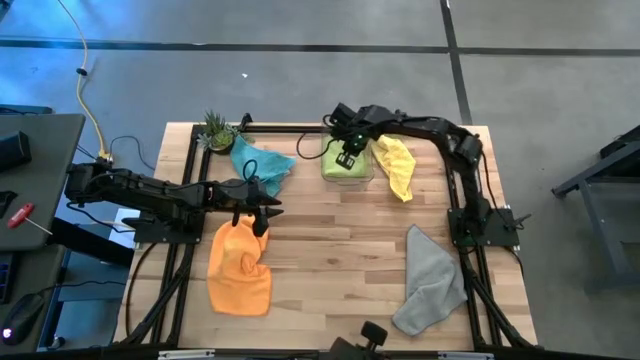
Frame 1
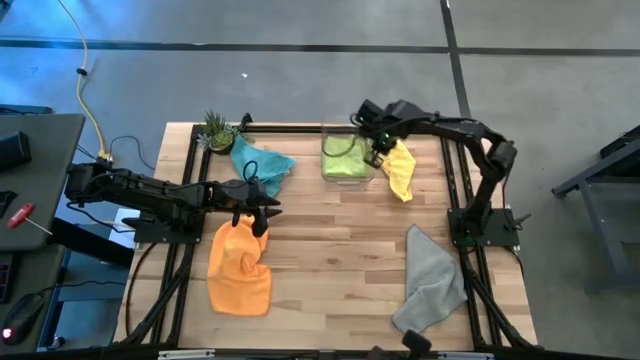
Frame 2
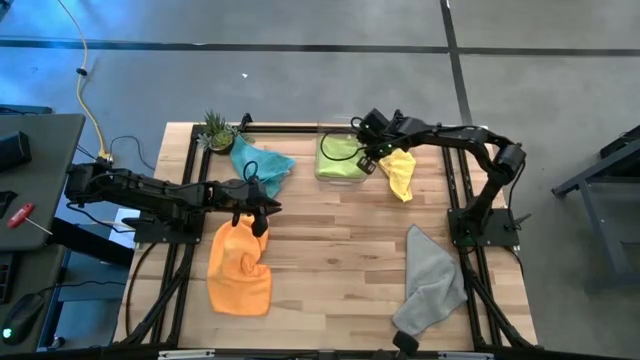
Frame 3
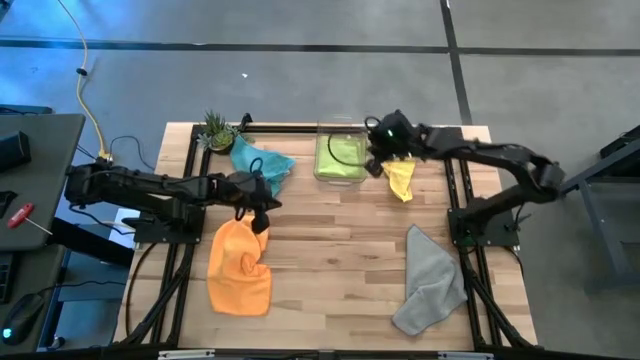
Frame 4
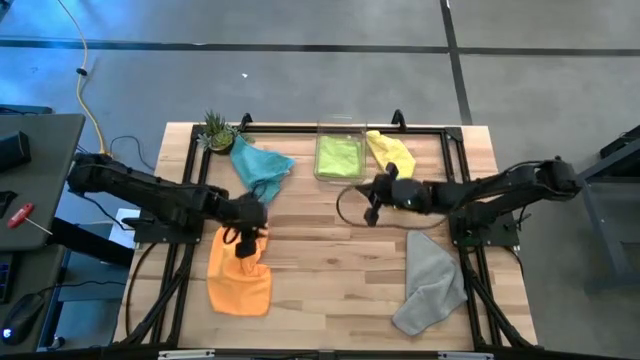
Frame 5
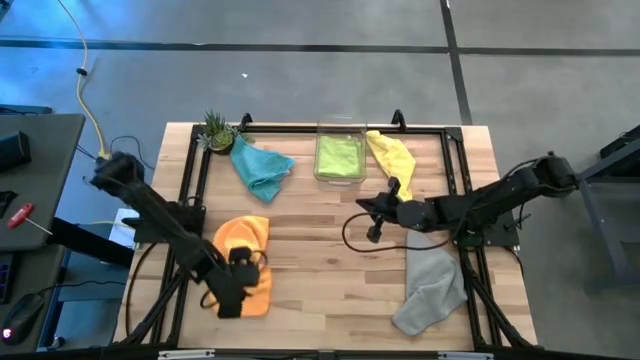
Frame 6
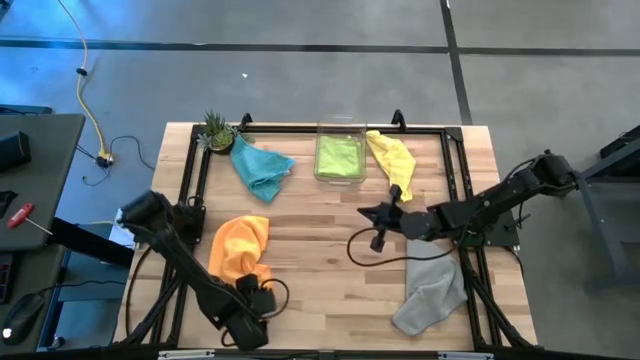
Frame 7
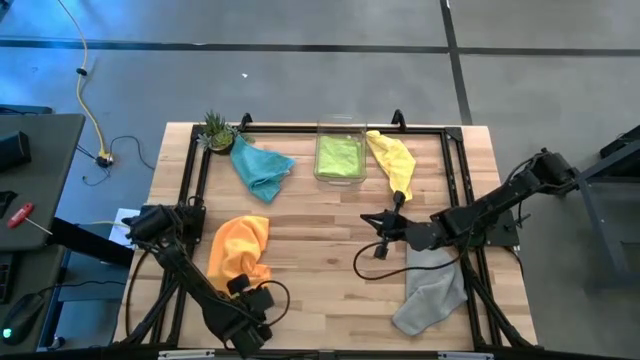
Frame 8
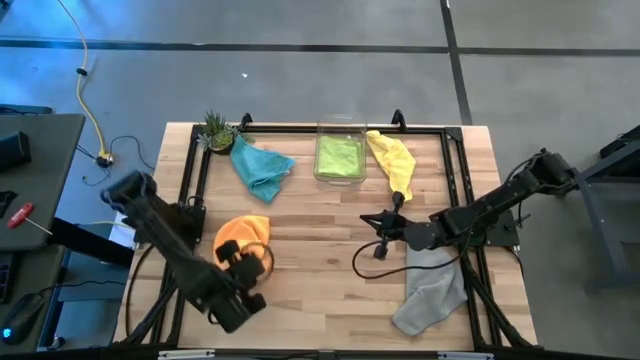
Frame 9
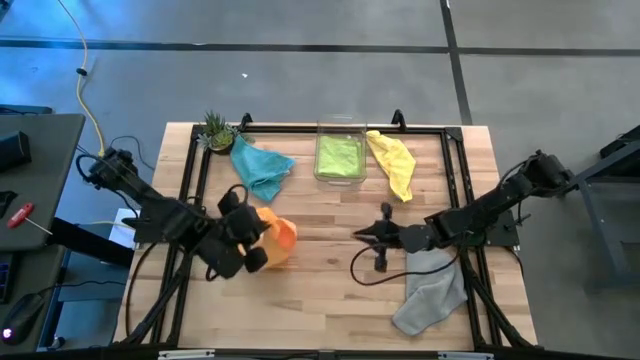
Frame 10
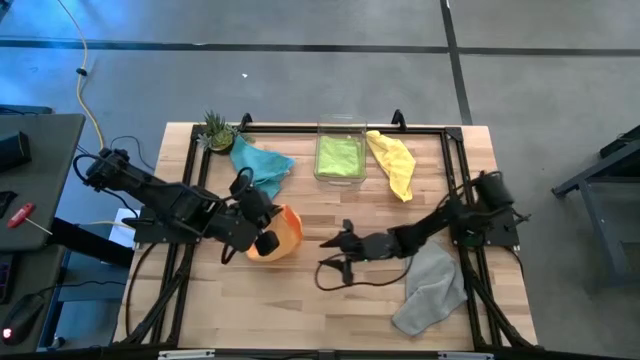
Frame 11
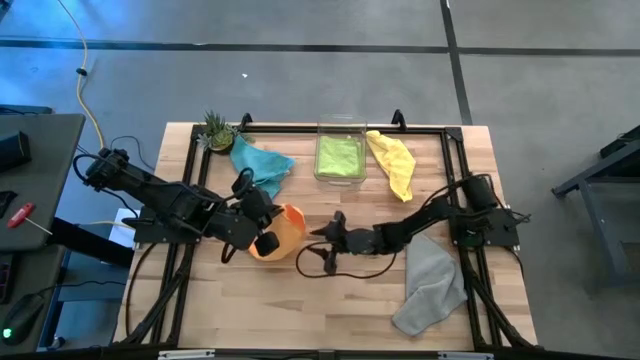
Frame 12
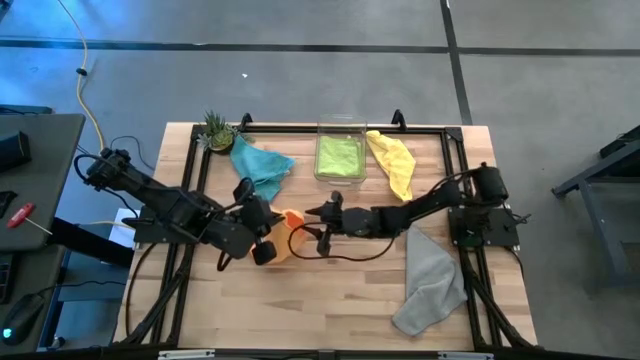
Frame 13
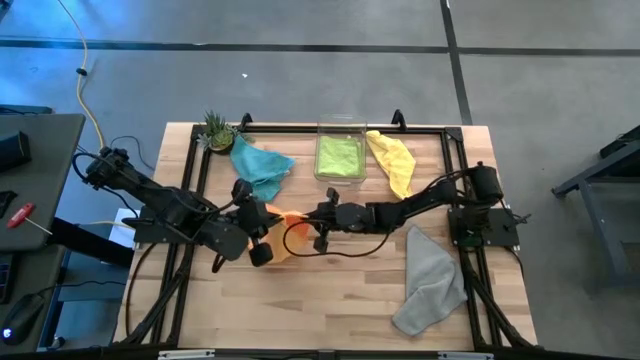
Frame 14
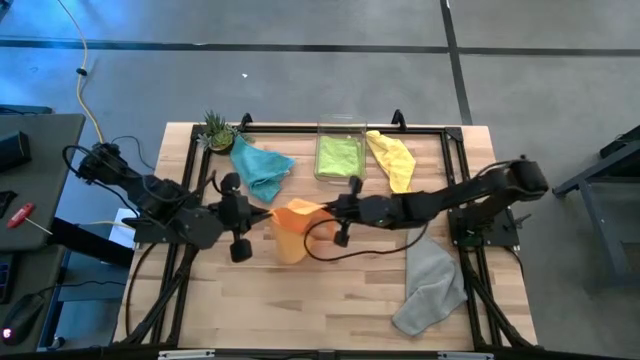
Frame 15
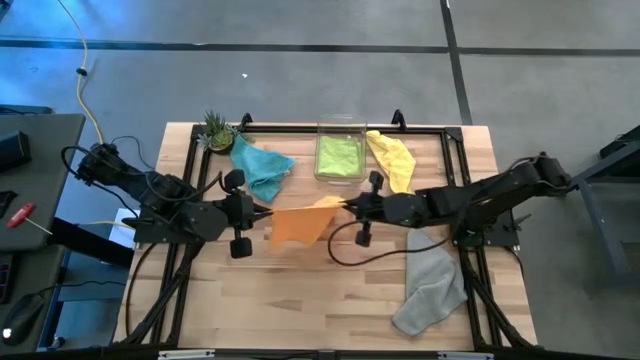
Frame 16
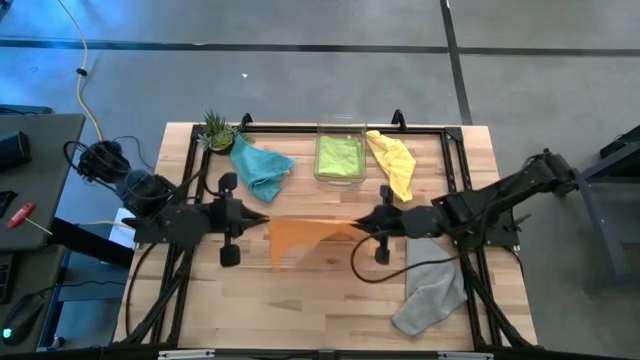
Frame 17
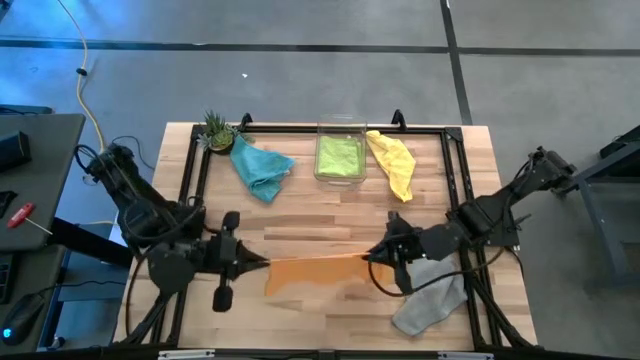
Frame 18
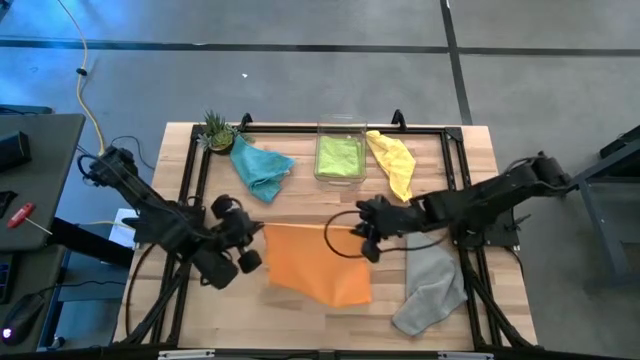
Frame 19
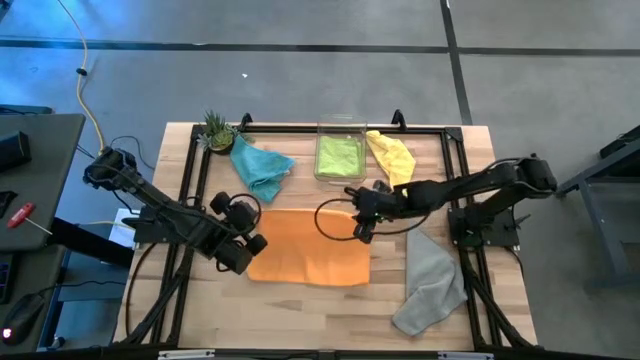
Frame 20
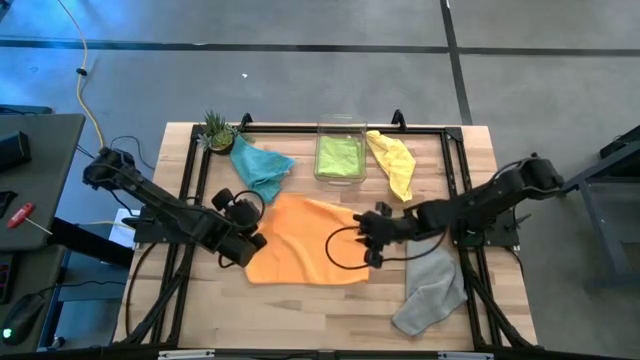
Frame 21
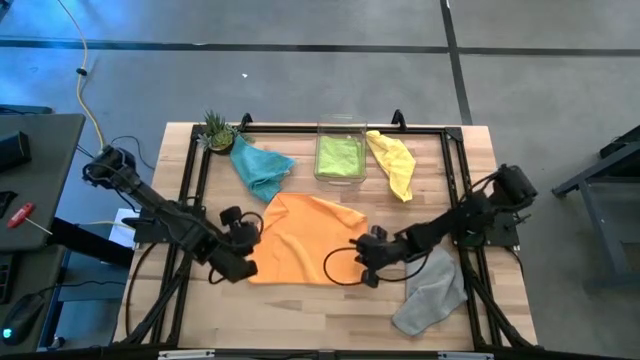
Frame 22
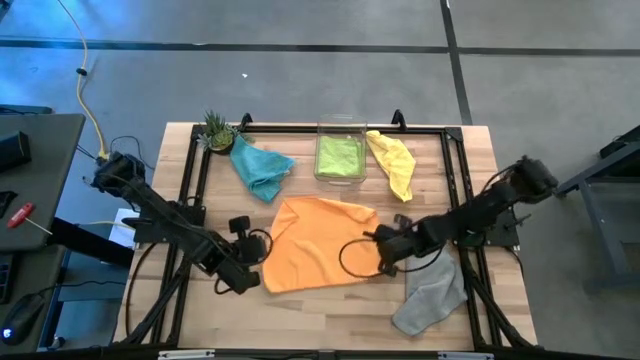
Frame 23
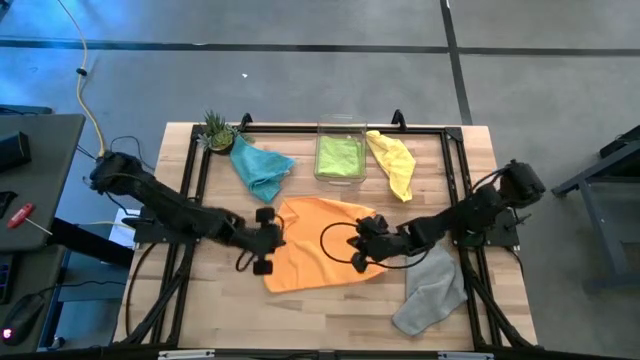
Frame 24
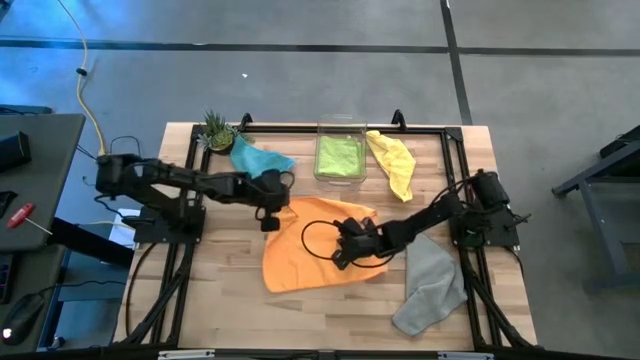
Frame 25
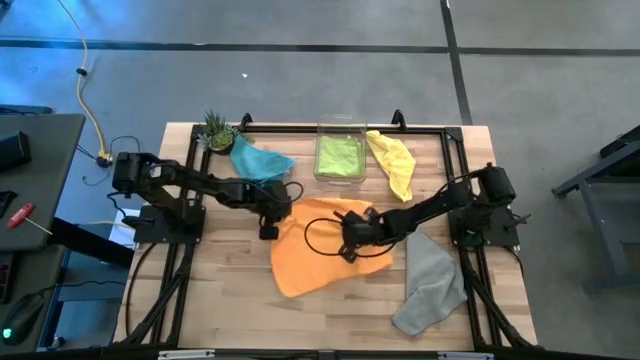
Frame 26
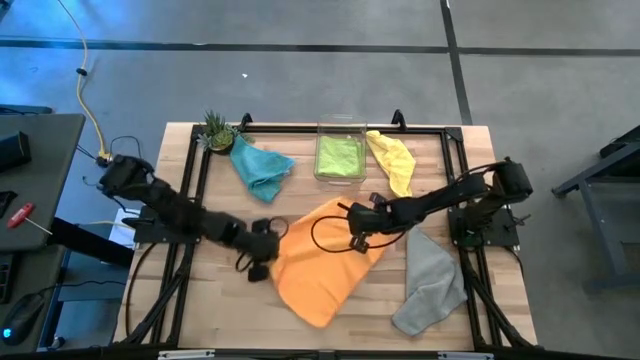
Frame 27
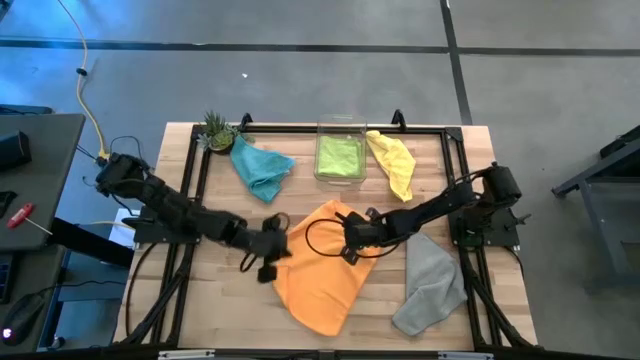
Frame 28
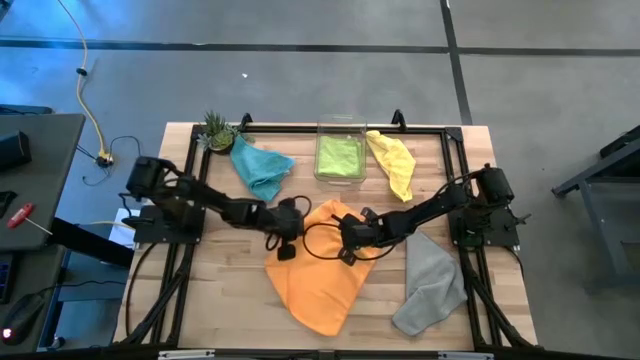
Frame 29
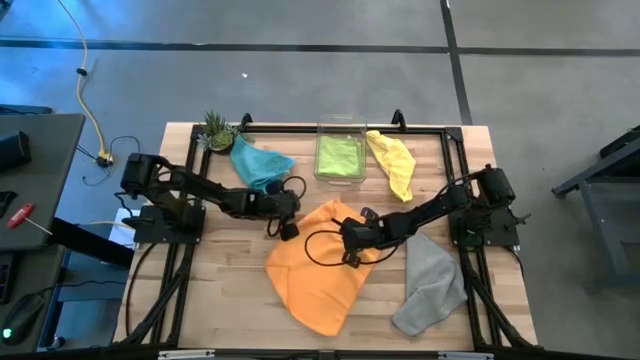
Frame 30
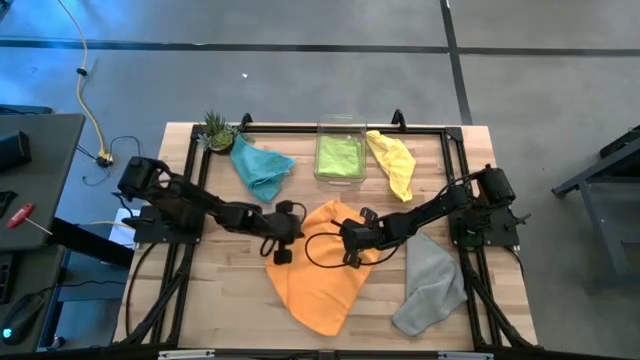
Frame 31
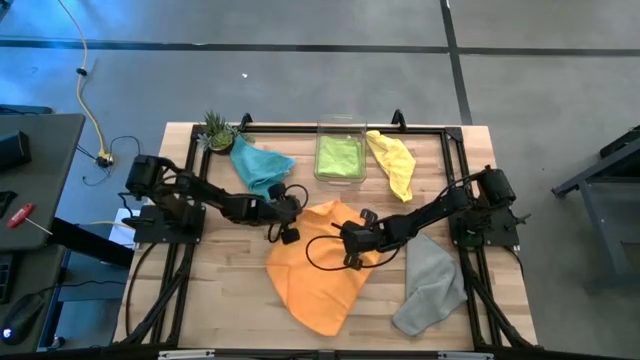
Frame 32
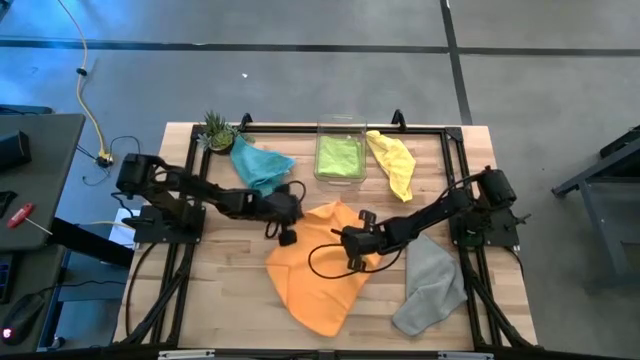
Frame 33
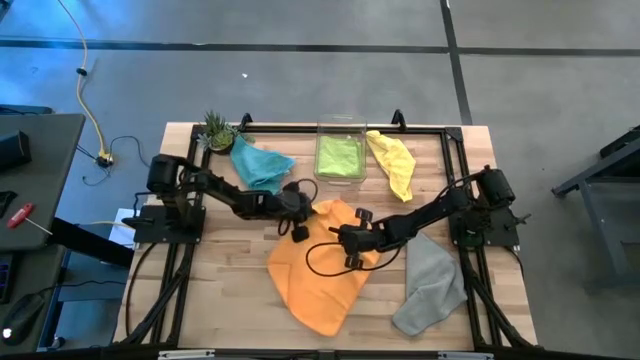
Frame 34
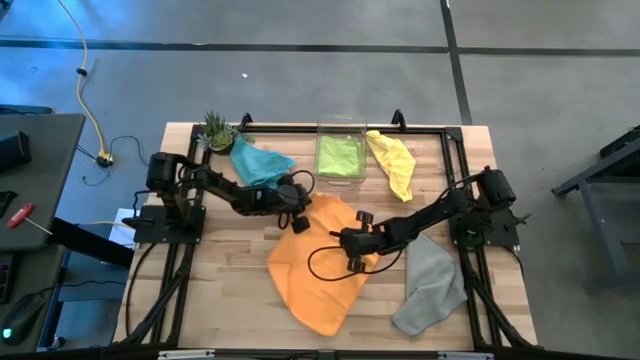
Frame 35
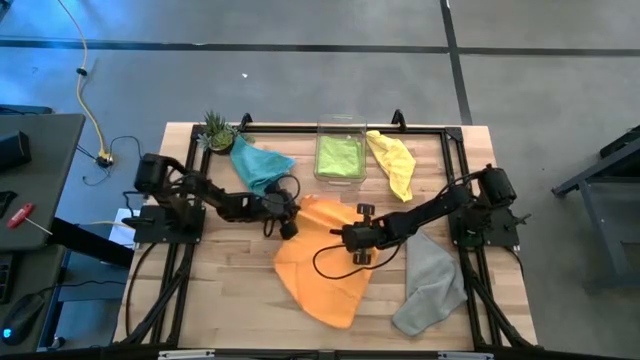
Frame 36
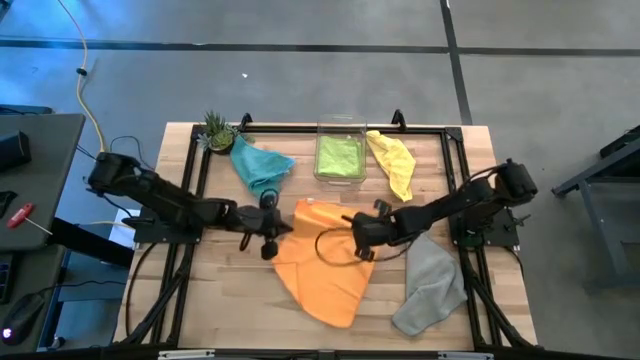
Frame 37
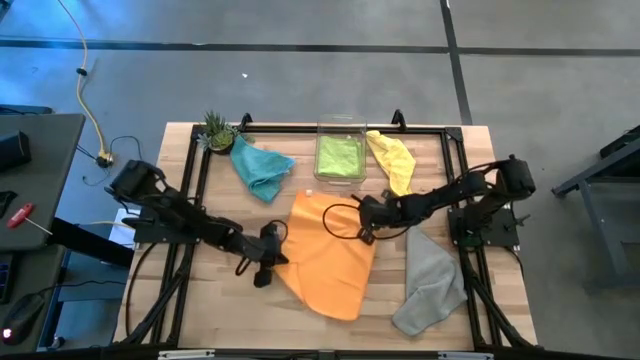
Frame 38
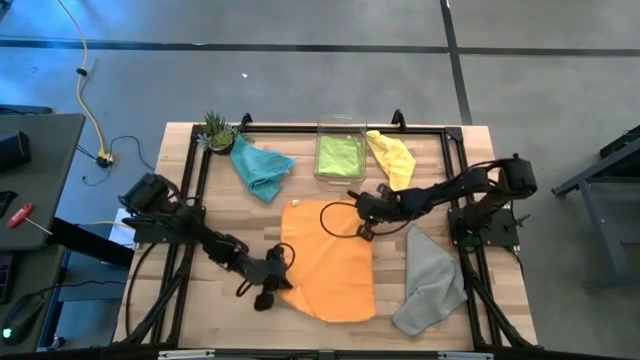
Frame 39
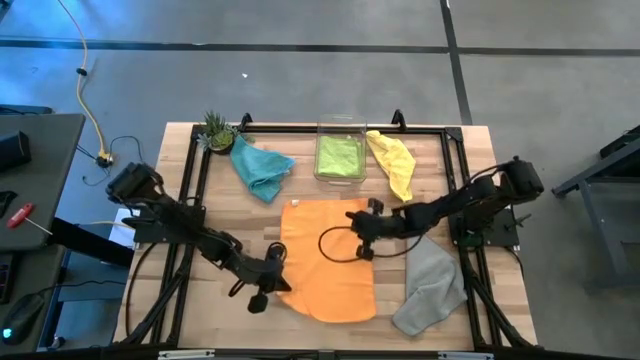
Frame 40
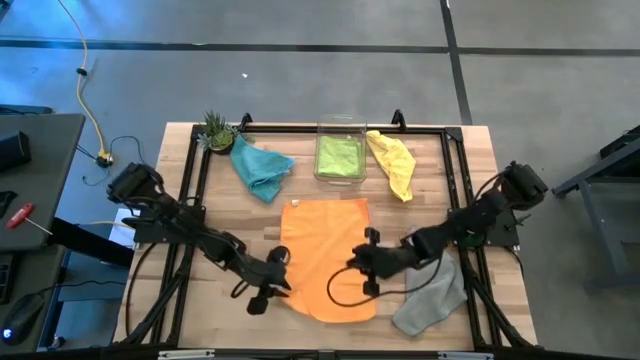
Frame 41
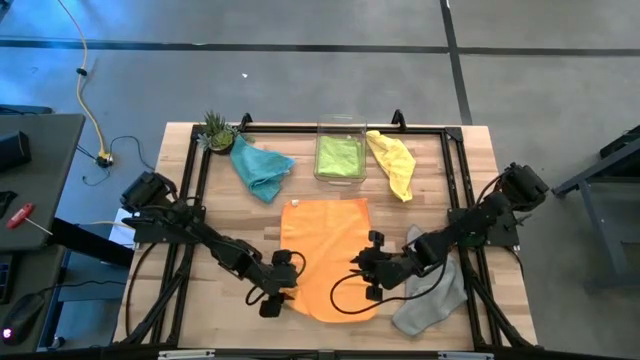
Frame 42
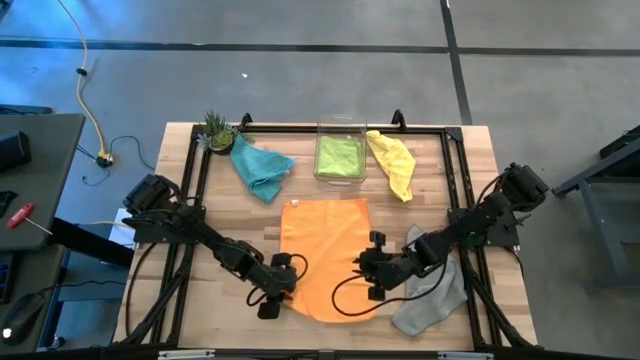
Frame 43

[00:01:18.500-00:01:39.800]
Task: Fold microfiber towels
Fold the orange microfiber cloth
